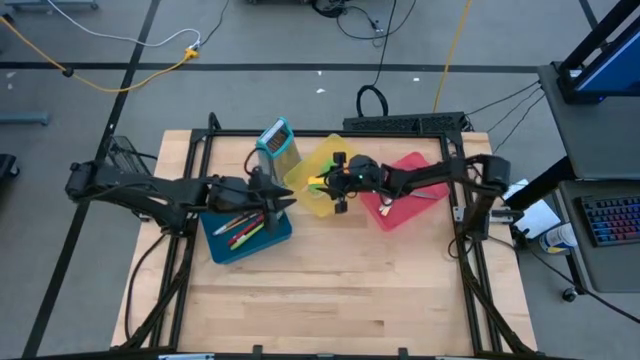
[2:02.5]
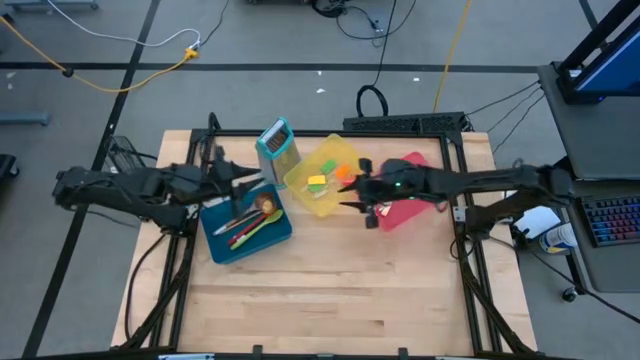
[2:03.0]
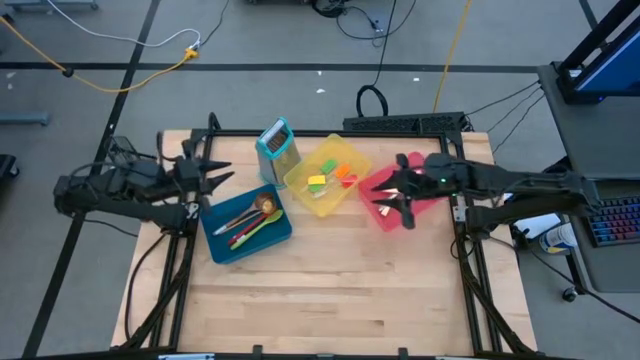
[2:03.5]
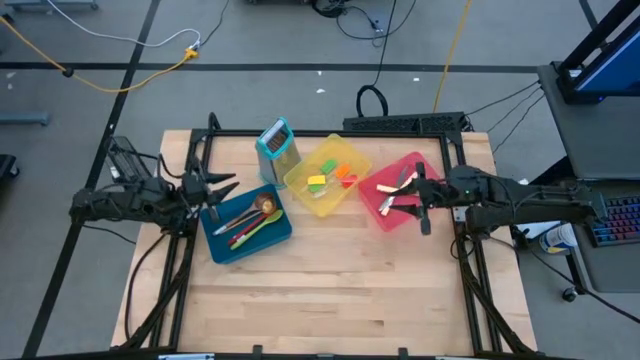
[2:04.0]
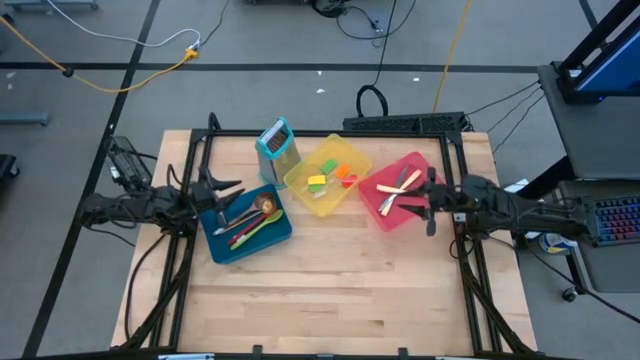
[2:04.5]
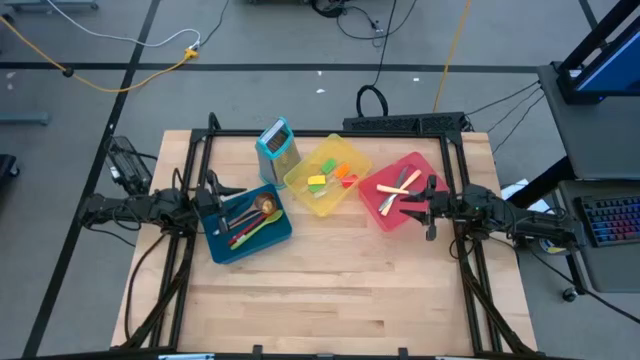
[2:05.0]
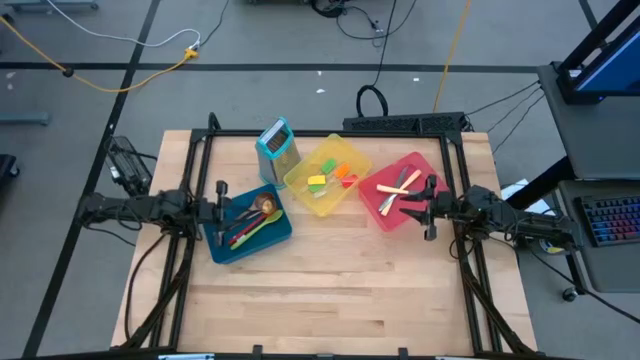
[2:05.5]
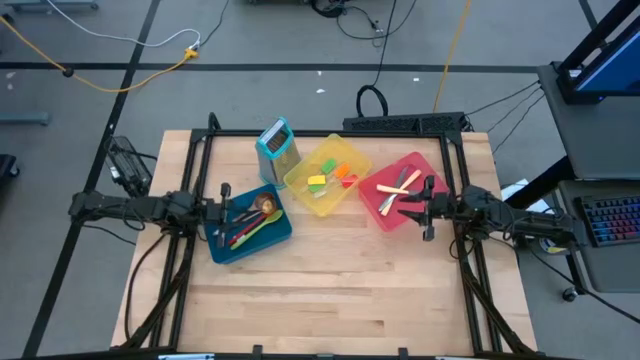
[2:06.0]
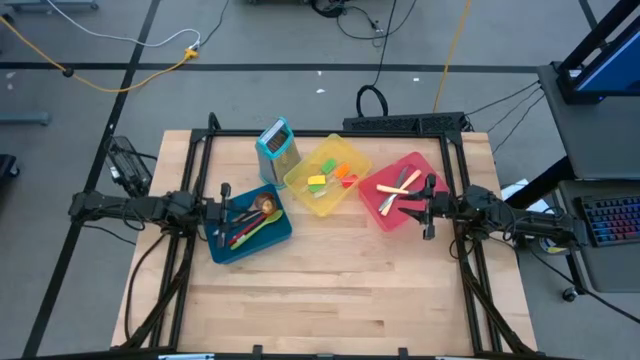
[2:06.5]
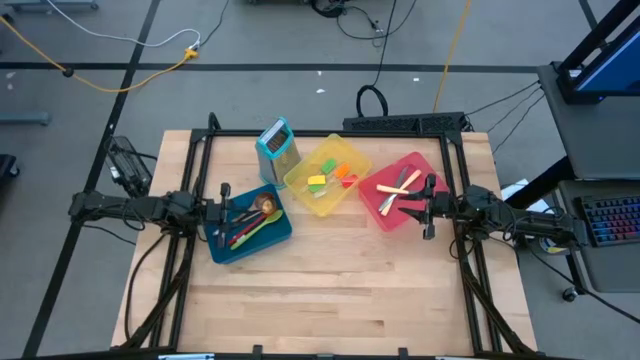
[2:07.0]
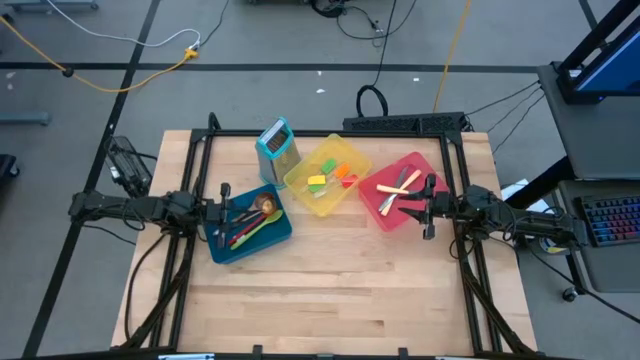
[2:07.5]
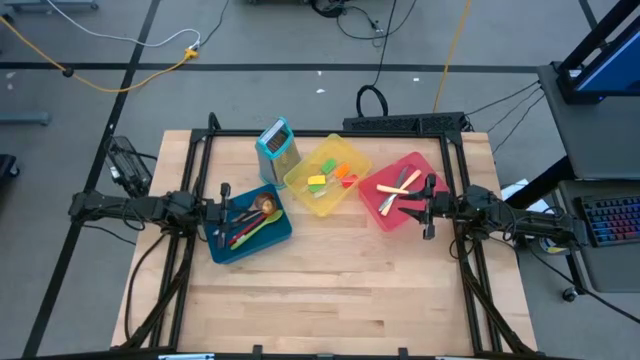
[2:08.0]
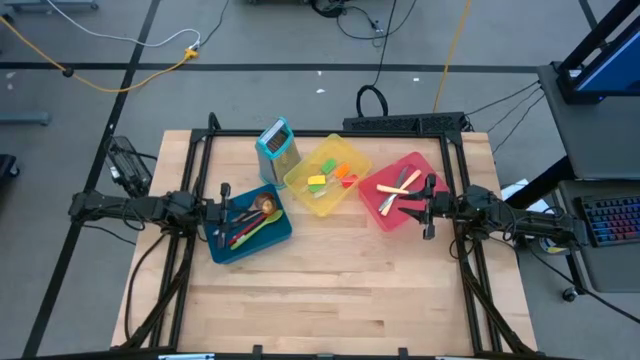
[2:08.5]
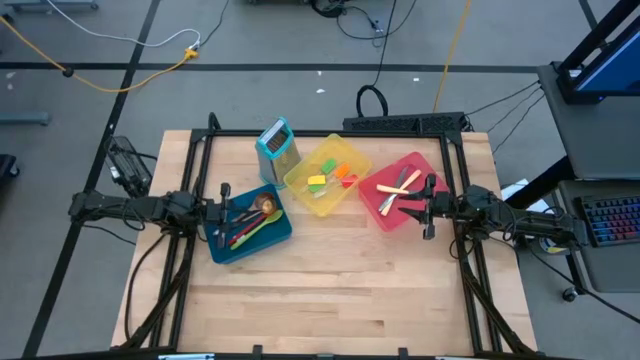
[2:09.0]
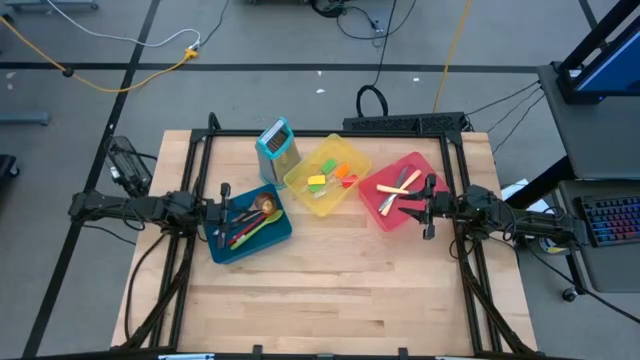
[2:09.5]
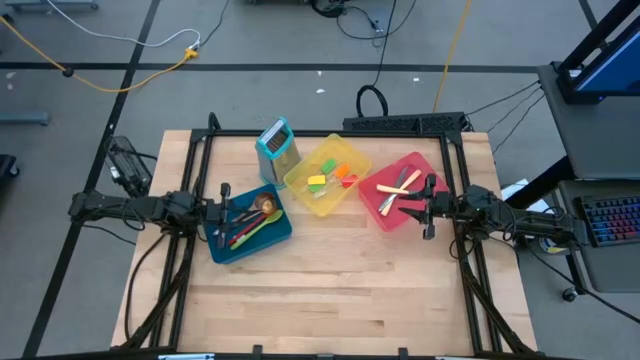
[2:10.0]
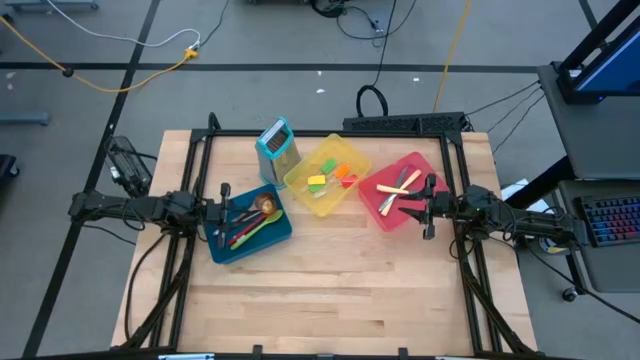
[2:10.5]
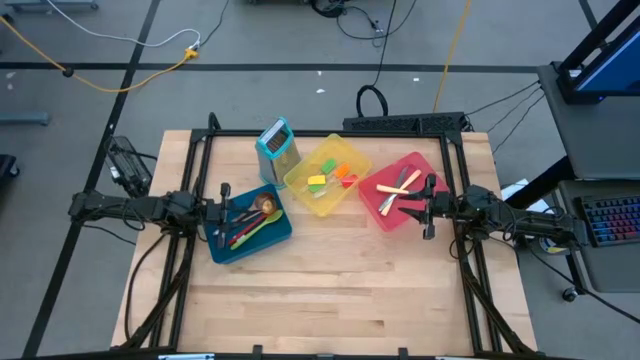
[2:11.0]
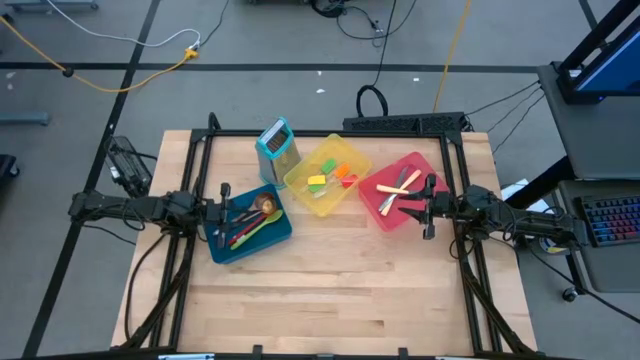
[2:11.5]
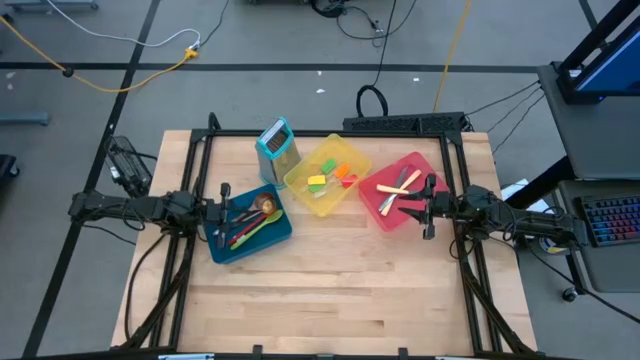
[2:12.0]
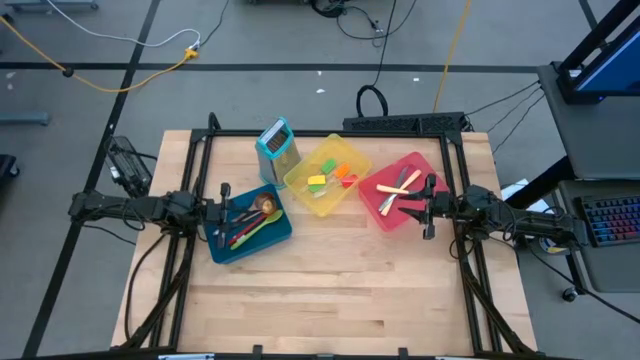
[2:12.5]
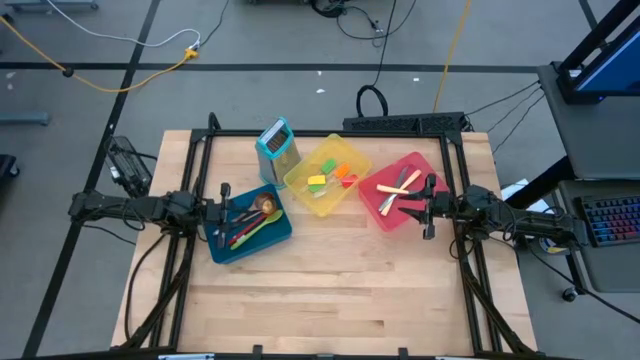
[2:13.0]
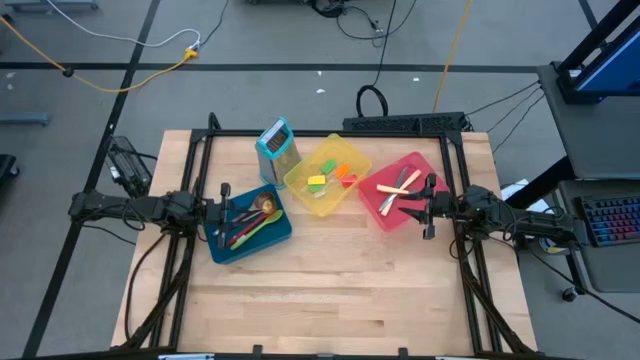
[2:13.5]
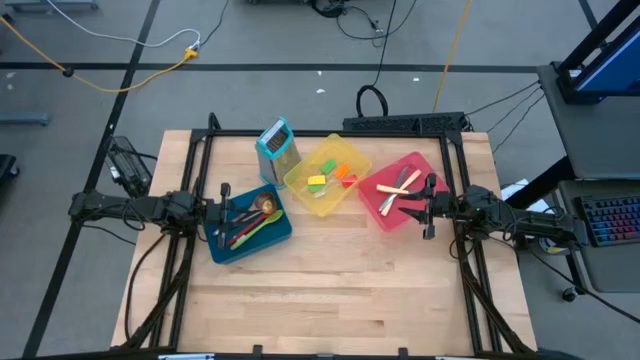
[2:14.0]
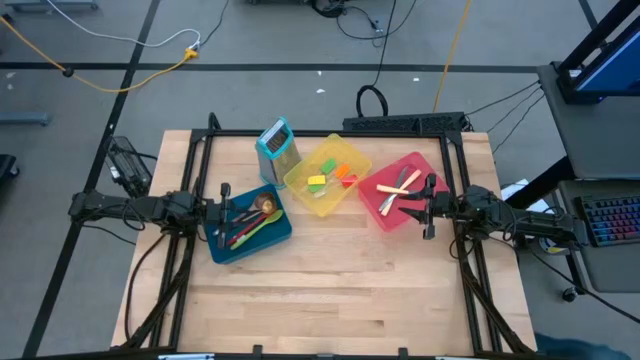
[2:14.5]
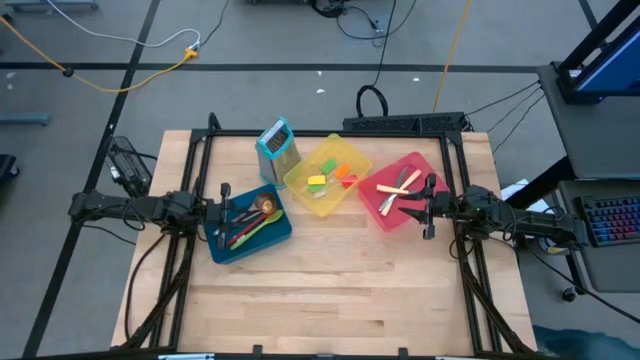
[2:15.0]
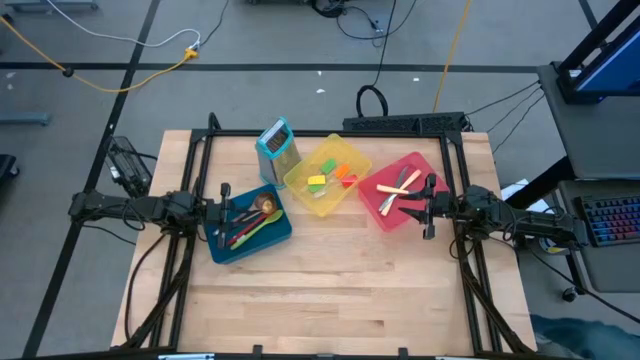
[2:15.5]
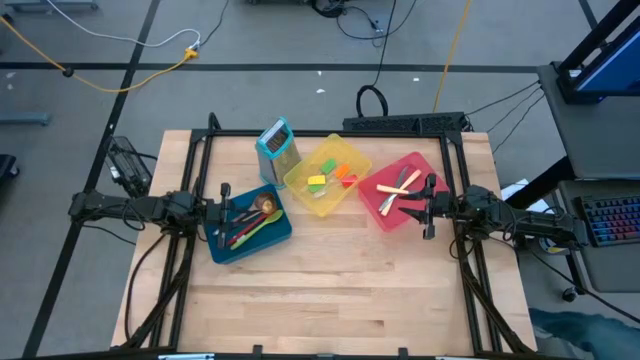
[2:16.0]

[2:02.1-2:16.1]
Task: Pick & Place Kitchen Items
Return to Home Position

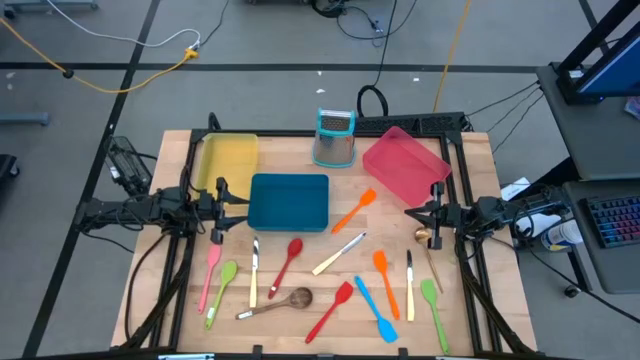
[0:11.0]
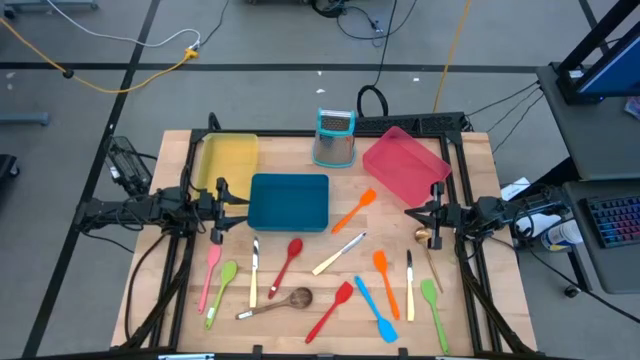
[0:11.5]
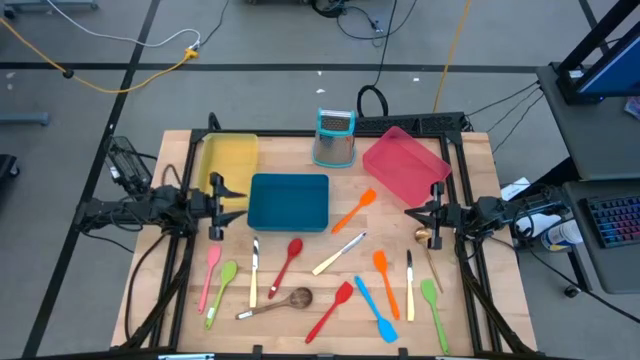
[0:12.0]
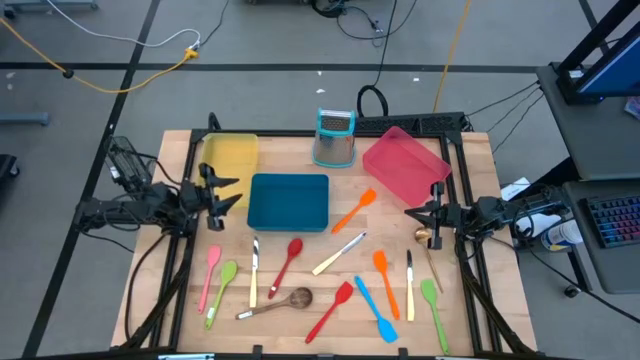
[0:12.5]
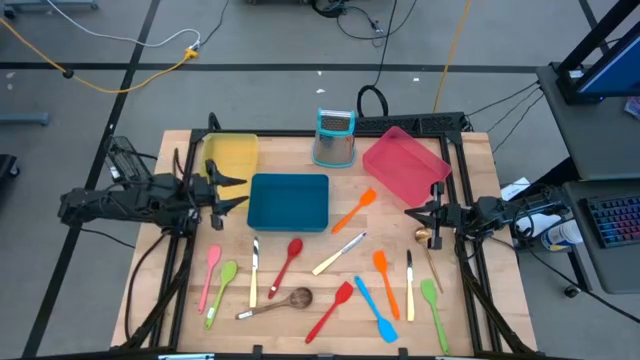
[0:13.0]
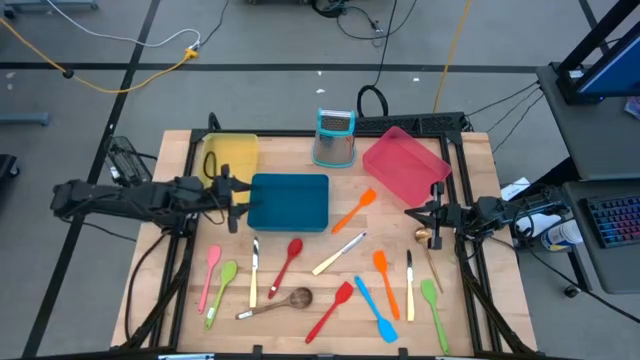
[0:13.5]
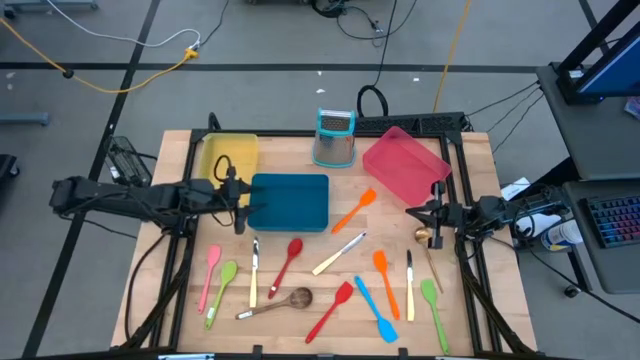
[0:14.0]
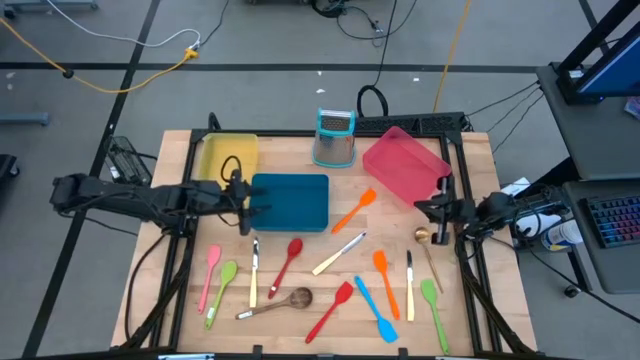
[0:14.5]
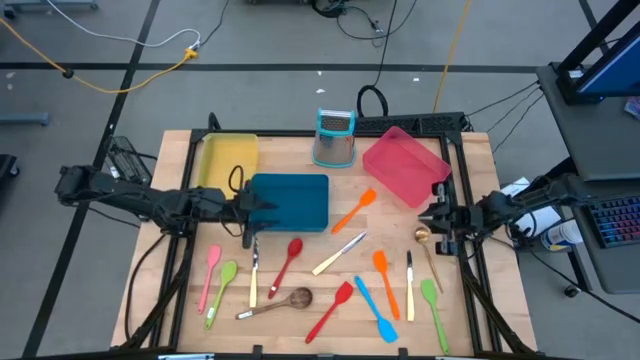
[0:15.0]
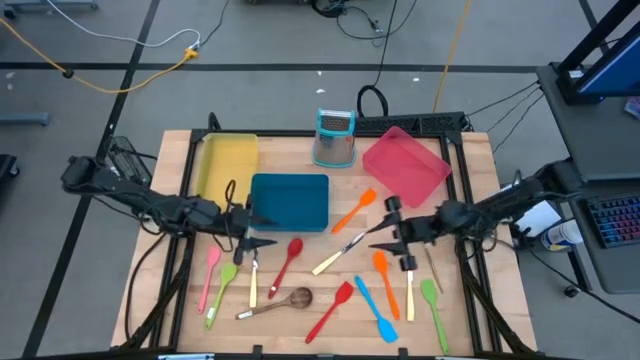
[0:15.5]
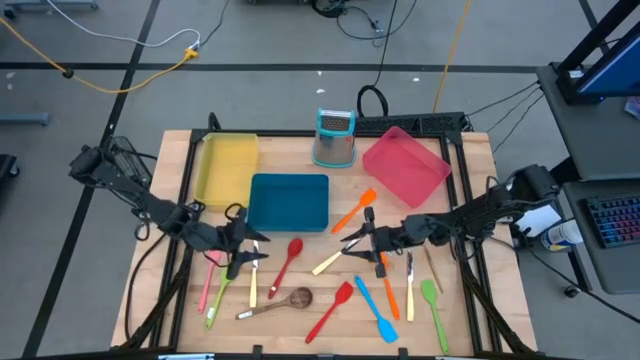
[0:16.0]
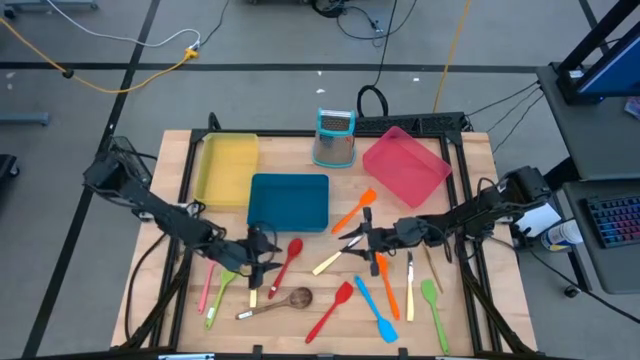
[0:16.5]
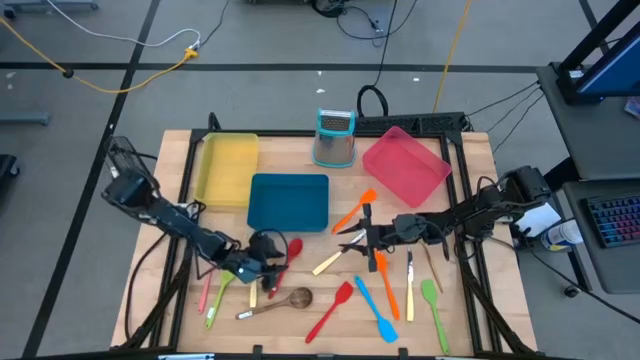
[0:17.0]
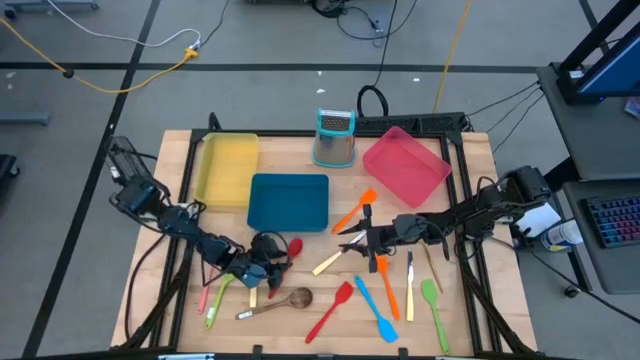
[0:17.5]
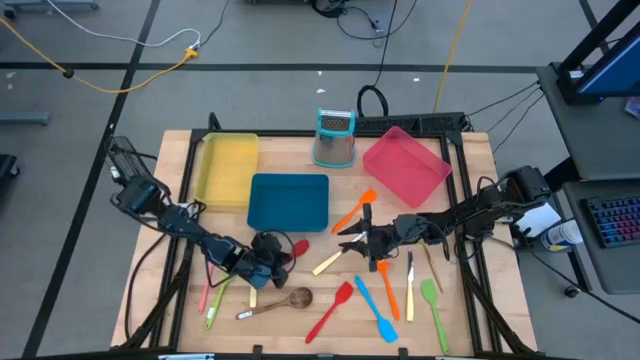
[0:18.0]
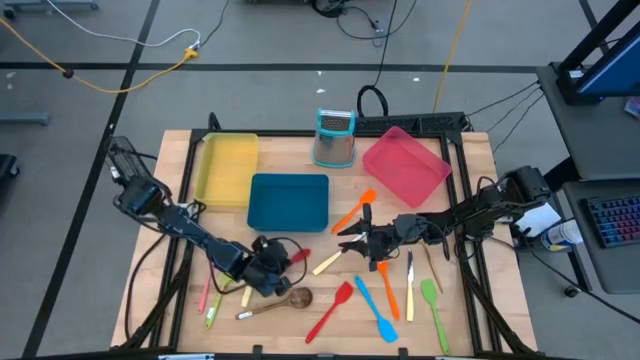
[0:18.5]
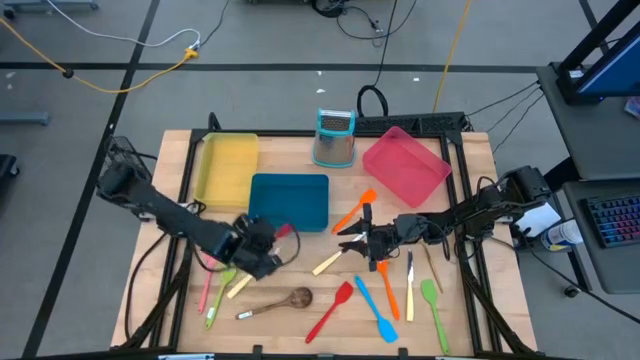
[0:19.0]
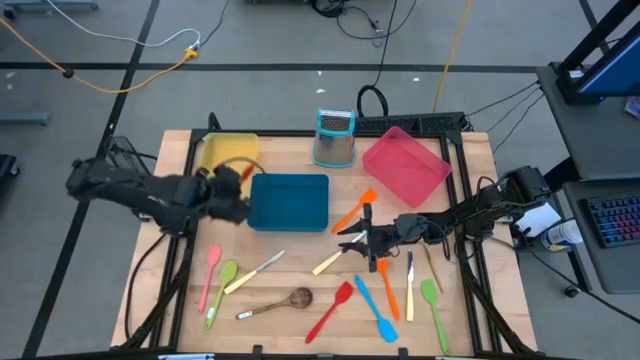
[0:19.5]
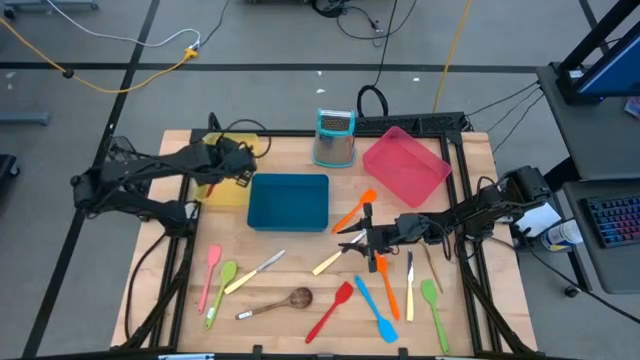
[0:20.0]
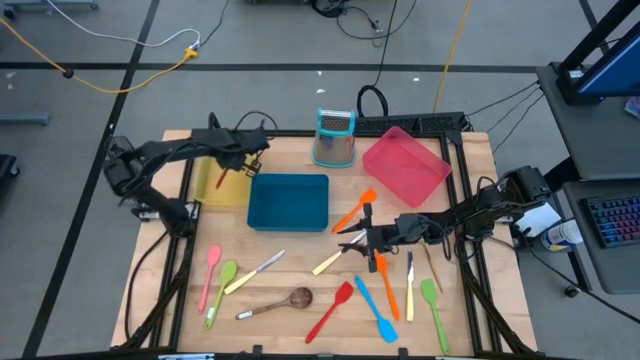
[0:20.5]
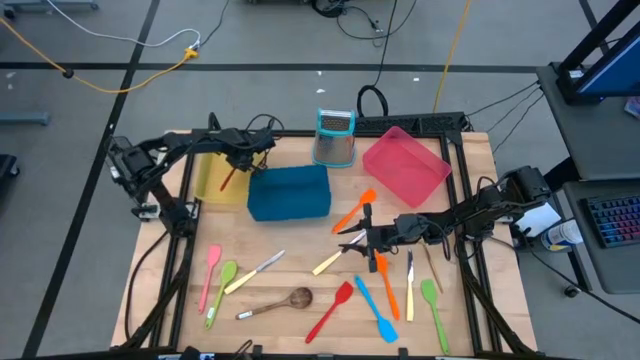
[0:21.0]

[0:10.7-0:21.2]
Task: Pick & Place Kitchen Items
Put the red serving spoon into the yellow bin
